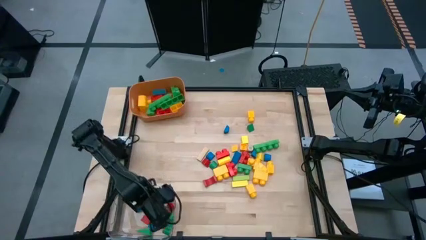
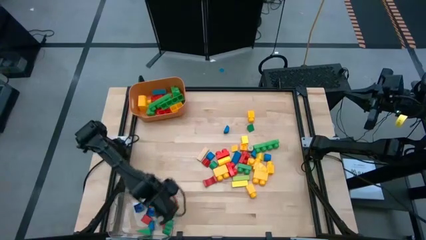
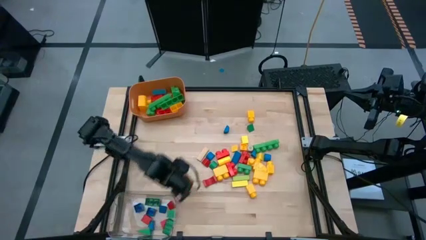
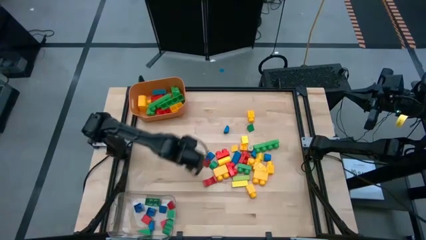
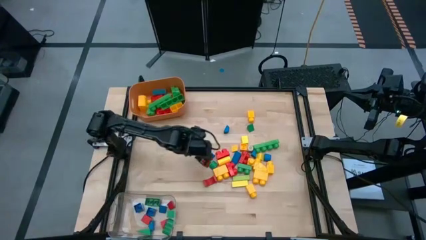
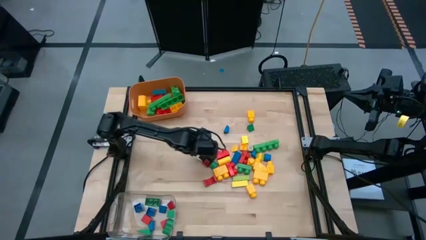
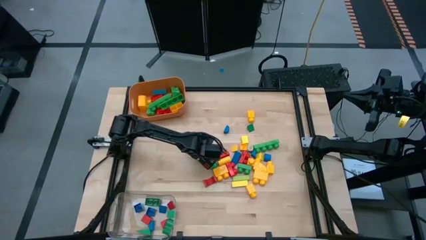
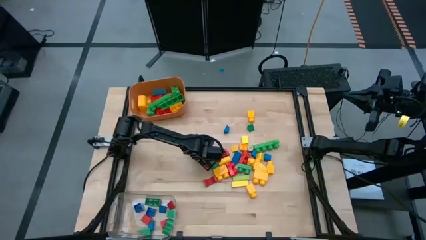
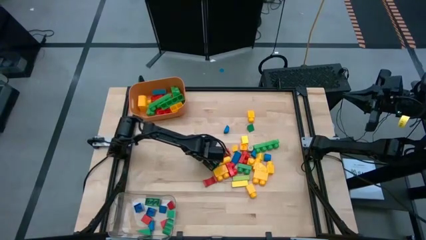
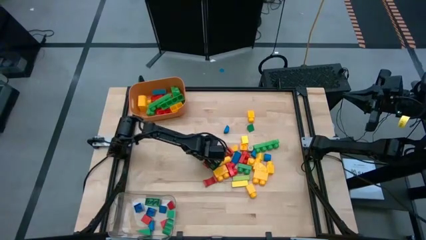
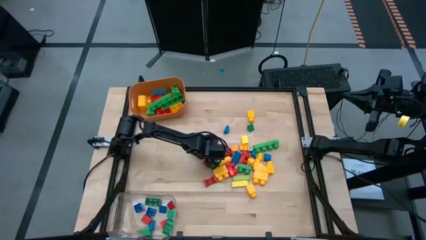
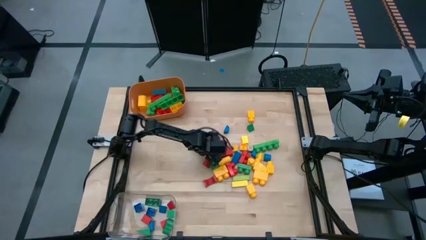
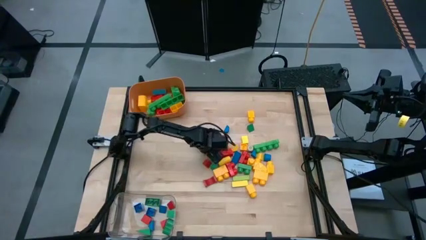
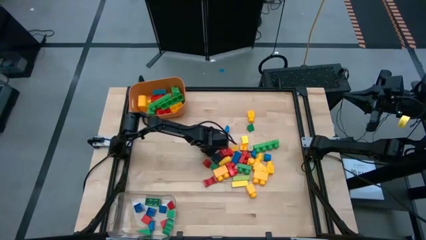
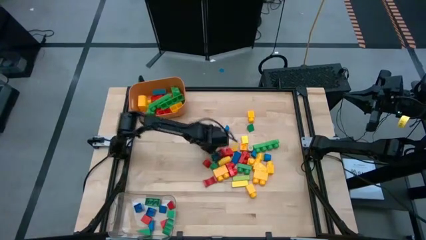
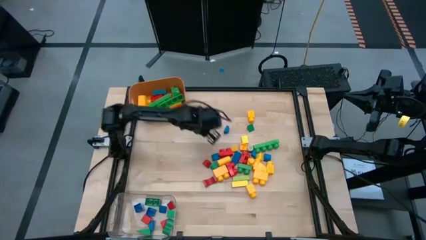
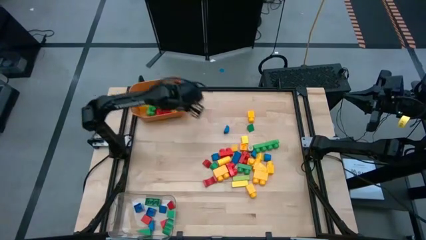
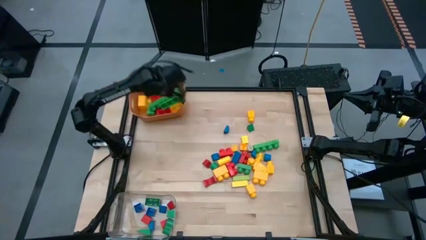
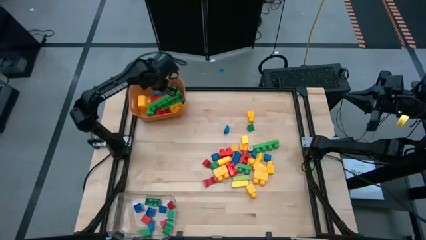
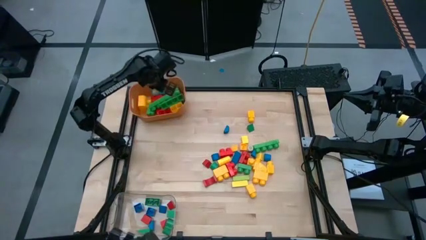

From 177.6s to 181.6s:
Task: Sort blocks by size
Put the big brown block into the orange bin

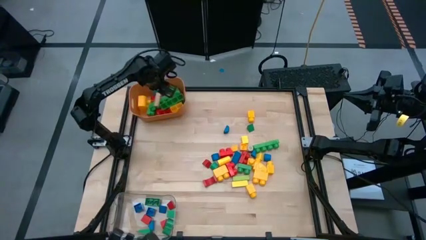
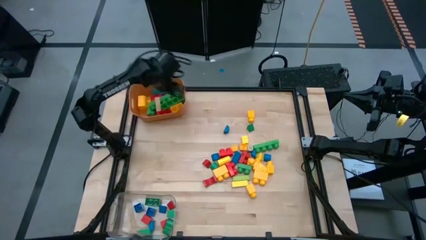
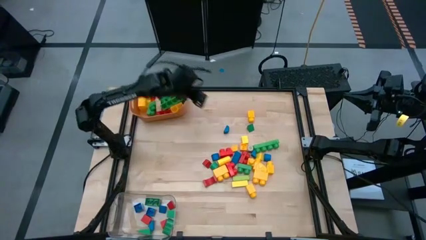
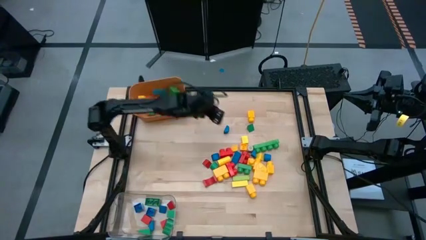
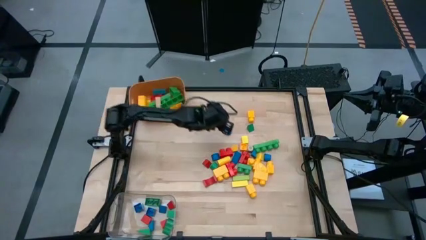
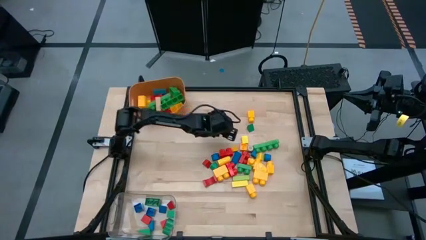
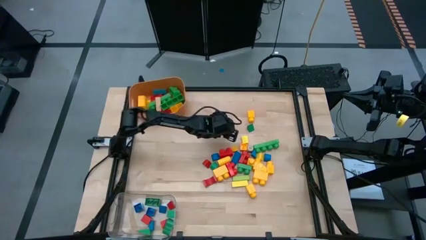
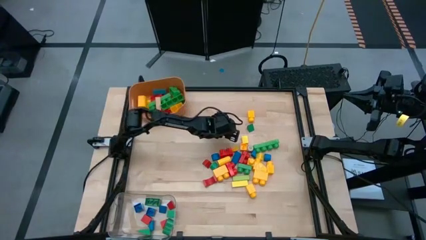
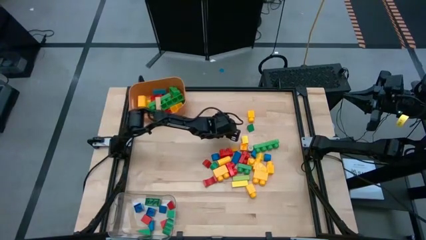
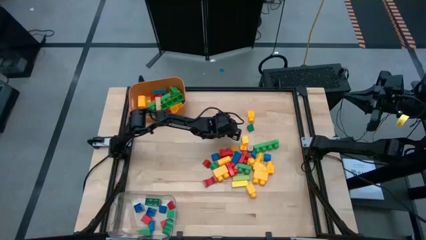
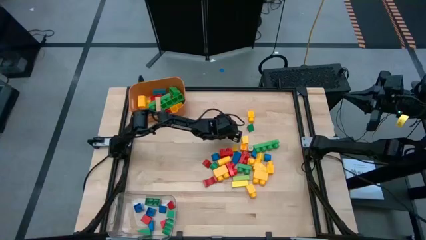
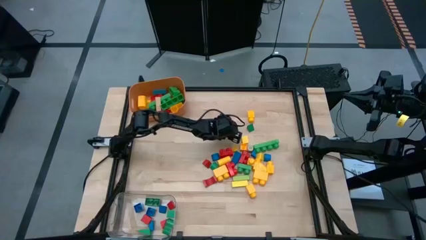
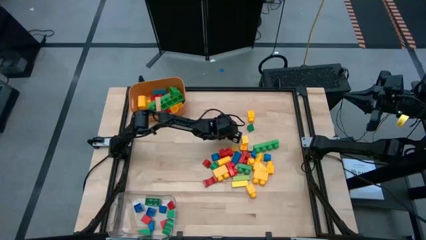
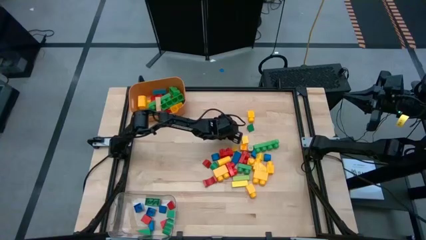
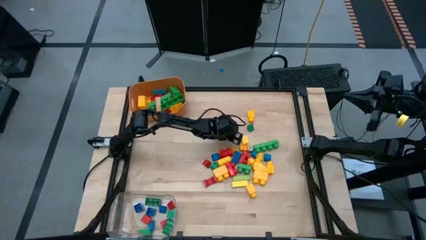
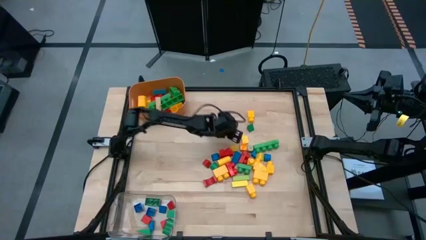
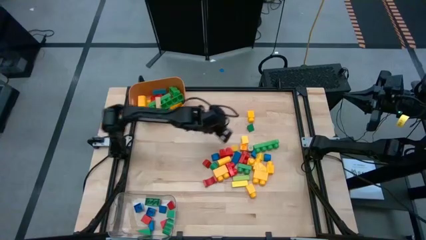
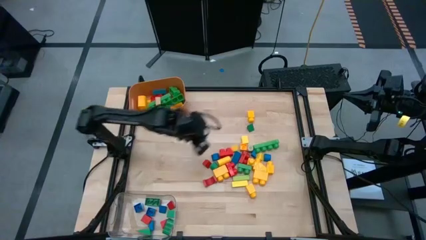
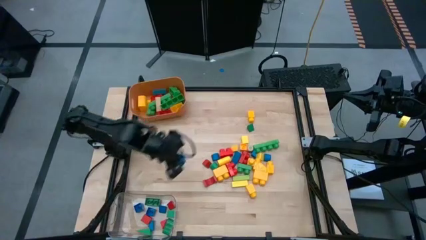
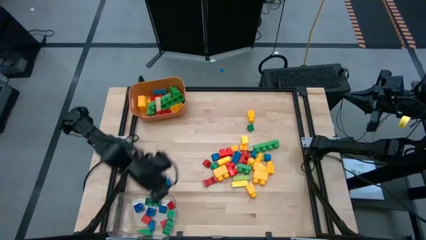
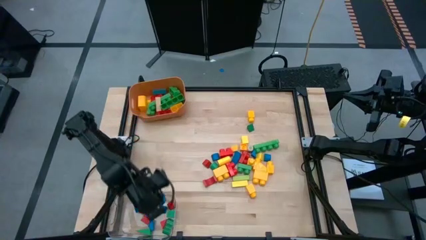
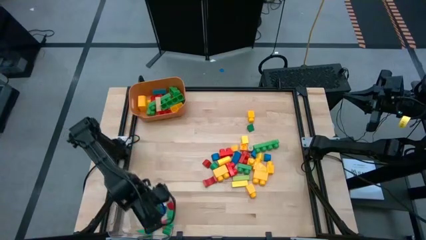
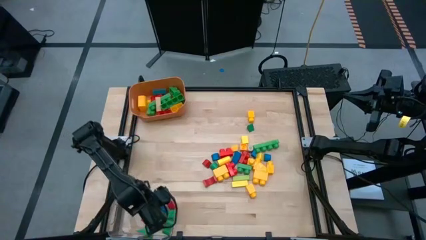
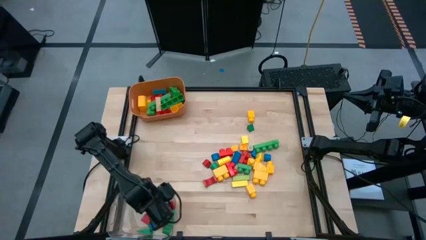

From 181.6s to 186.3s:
Put the small blue block into the transparent bin

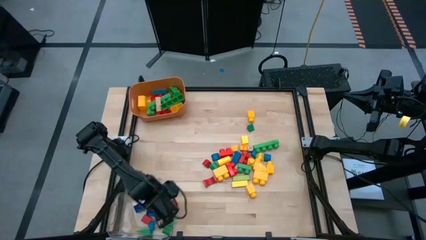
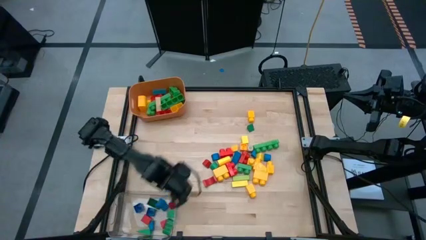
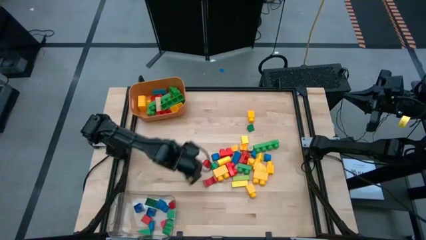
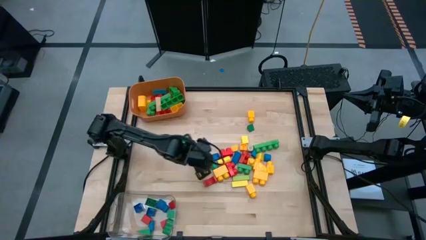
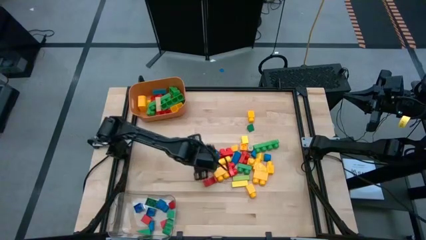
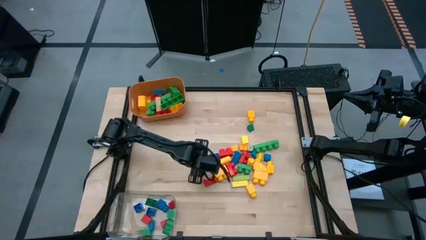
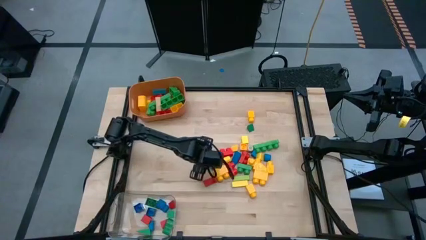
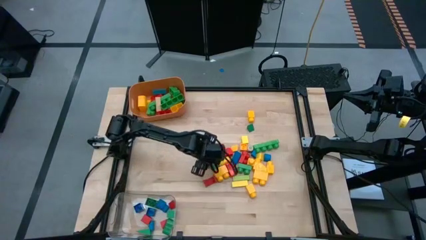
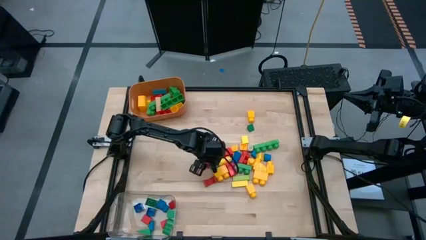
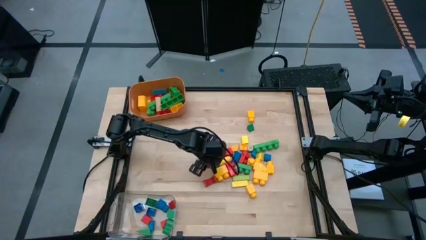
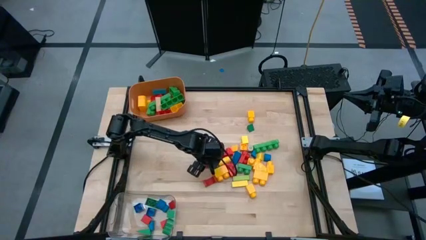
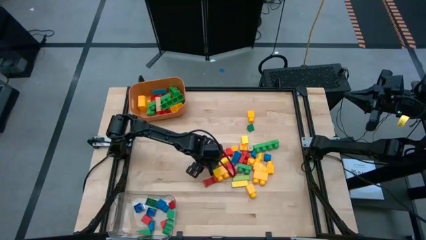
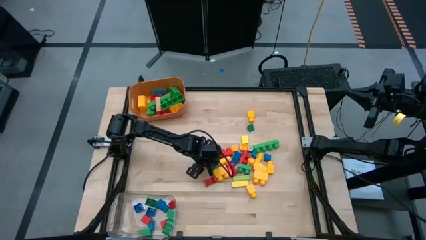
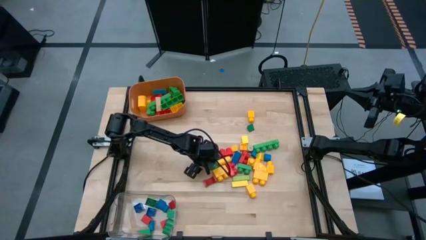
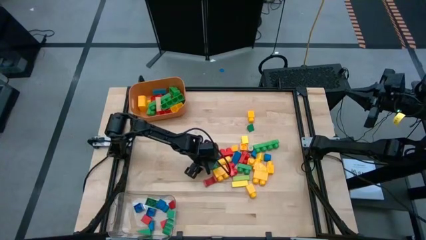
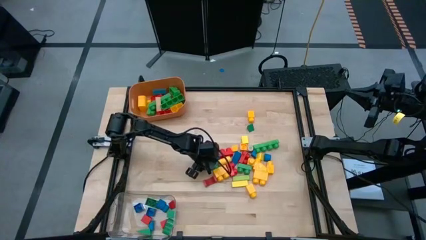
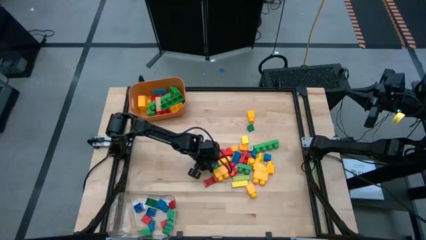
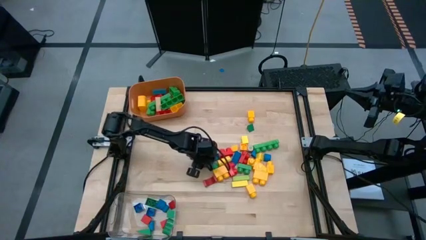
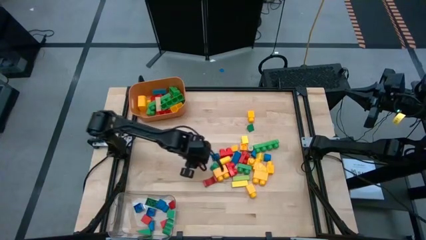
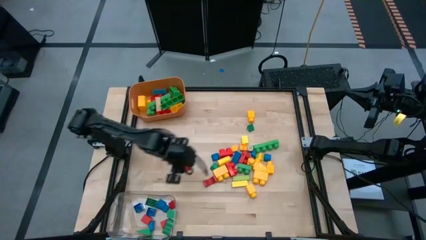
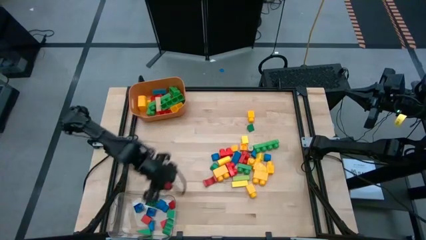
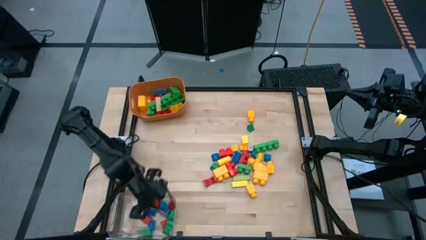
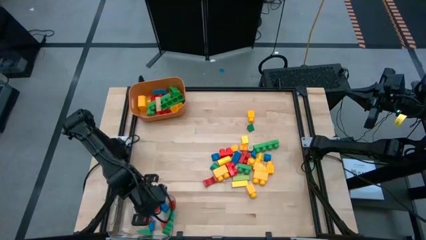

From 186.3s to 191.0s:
Put the small red block into the transparent bin

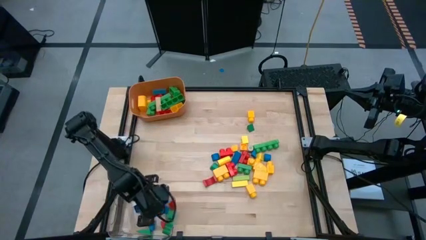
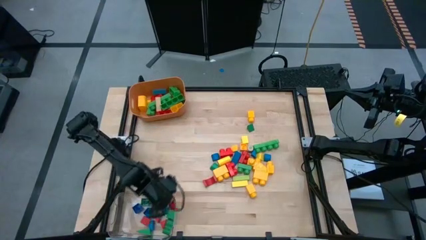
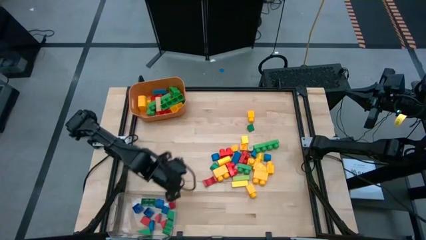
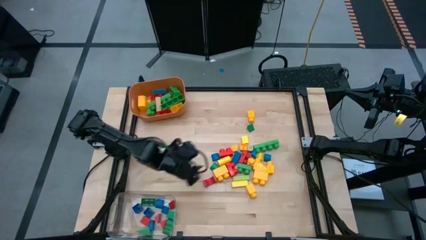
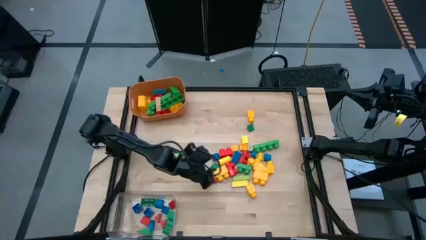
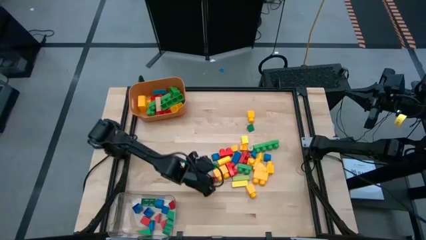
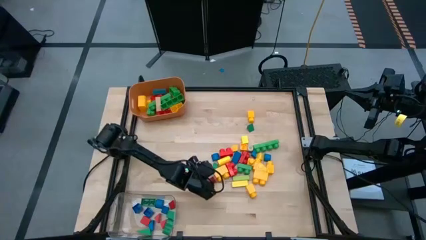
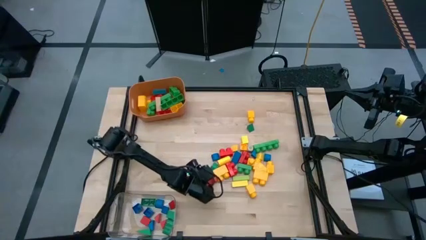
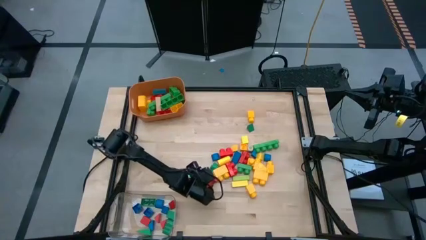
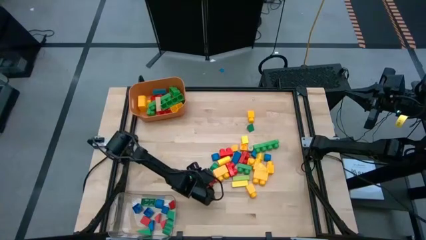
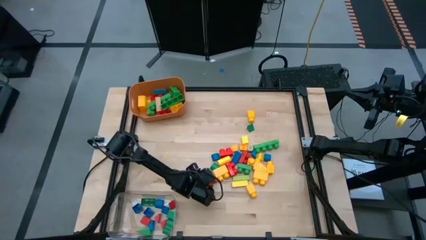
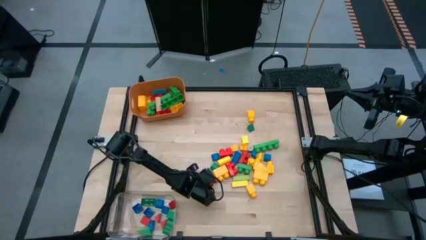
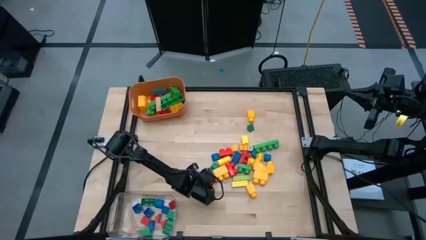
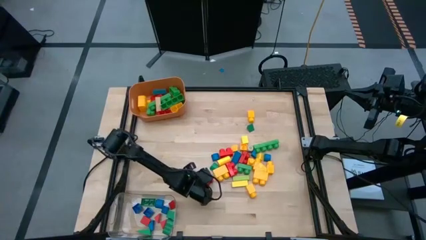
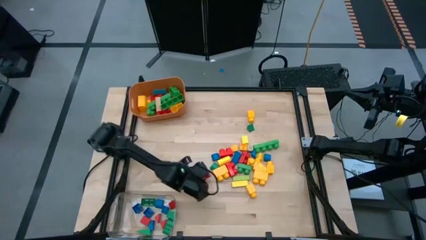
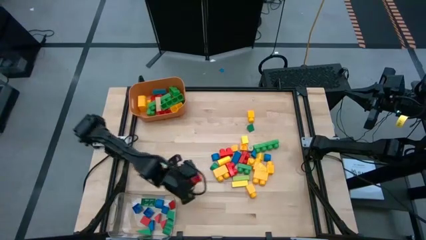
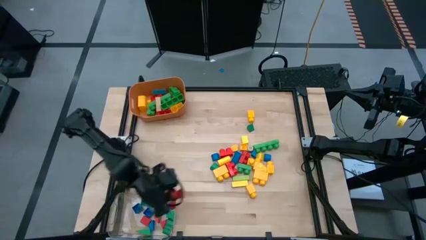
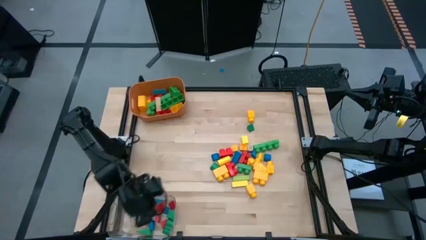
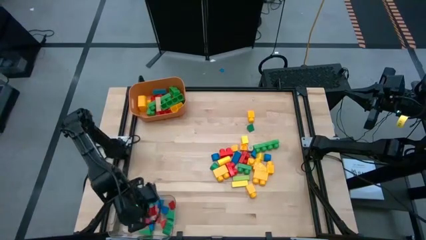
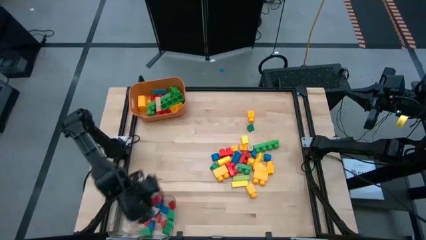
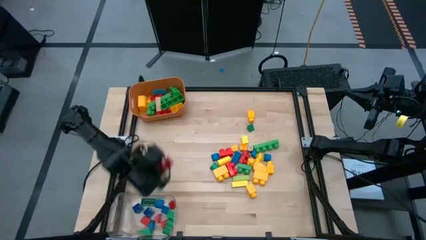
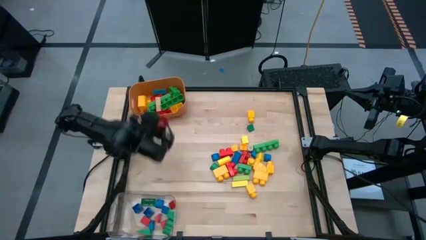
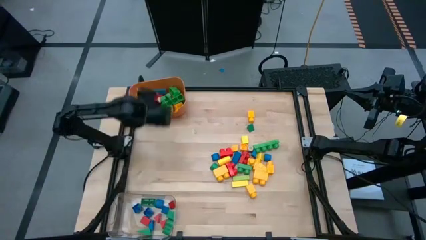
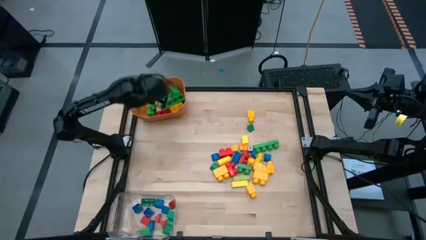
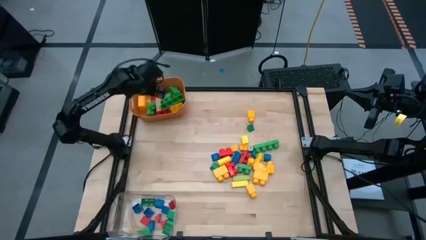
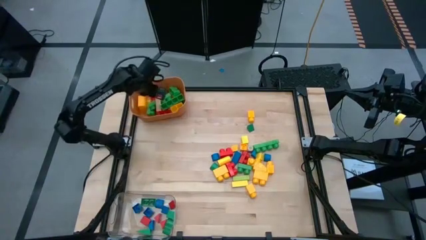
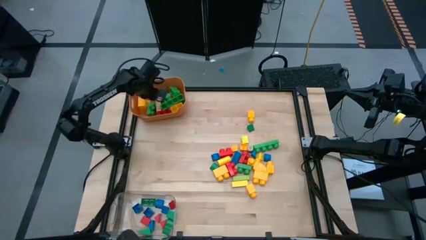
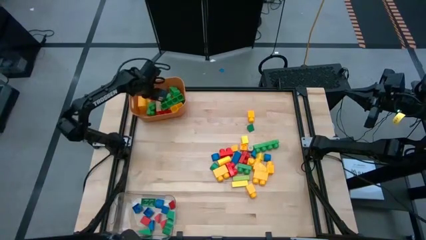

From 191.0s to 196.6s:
Put the big red block into the orange bin
